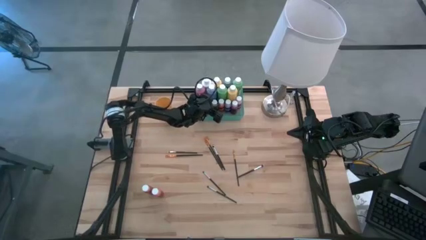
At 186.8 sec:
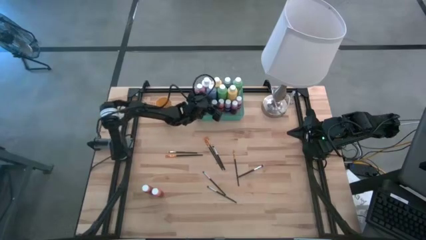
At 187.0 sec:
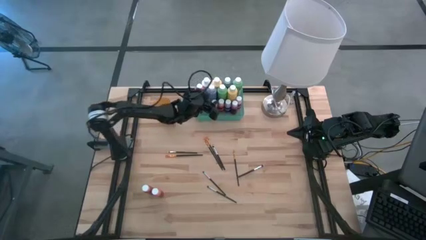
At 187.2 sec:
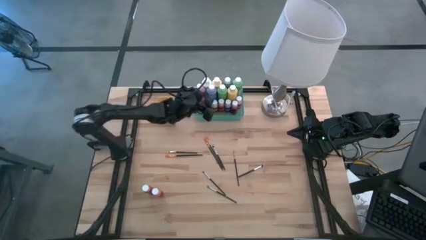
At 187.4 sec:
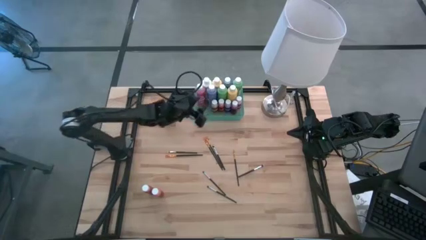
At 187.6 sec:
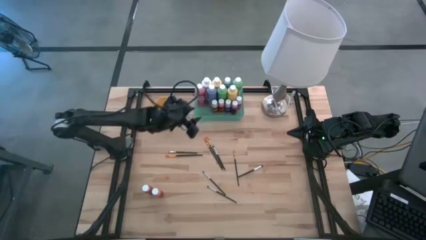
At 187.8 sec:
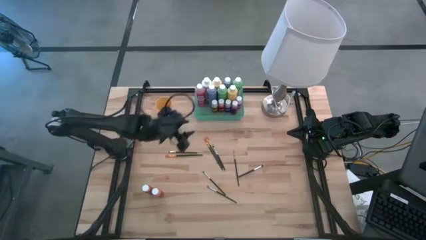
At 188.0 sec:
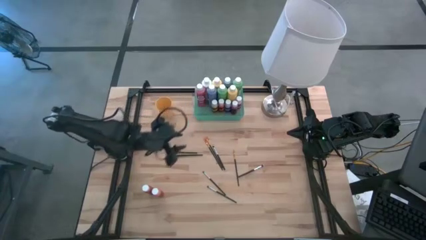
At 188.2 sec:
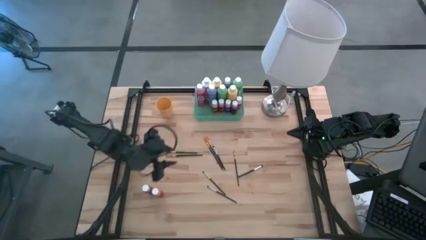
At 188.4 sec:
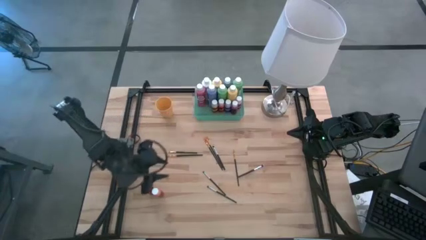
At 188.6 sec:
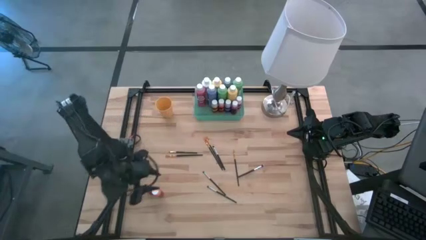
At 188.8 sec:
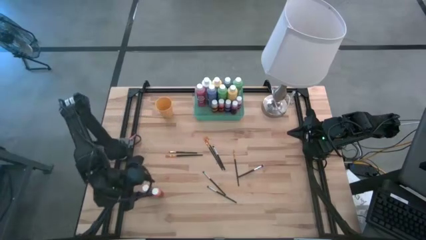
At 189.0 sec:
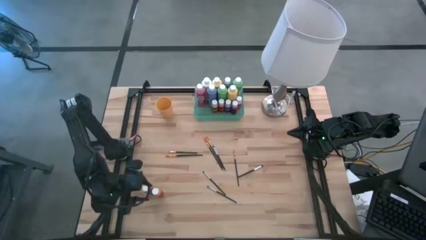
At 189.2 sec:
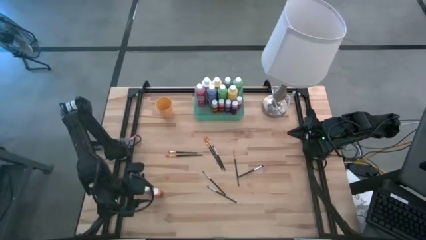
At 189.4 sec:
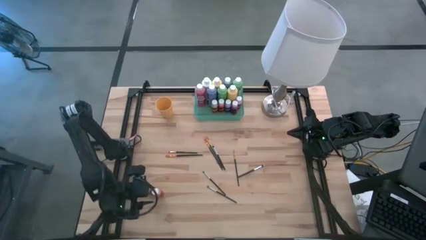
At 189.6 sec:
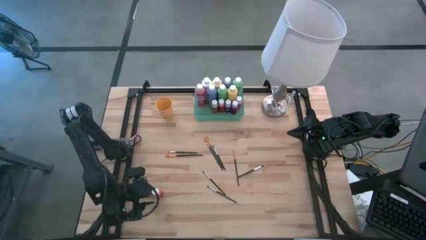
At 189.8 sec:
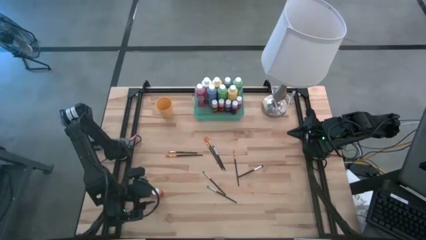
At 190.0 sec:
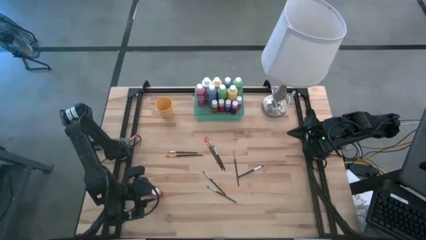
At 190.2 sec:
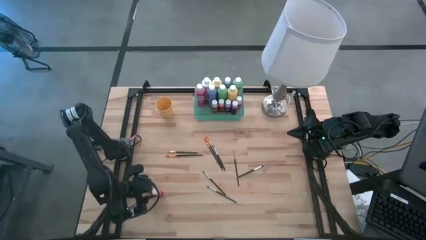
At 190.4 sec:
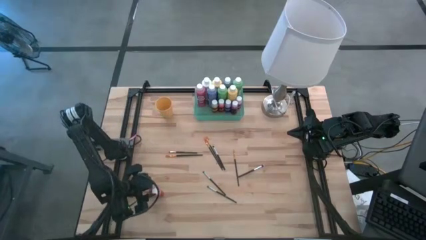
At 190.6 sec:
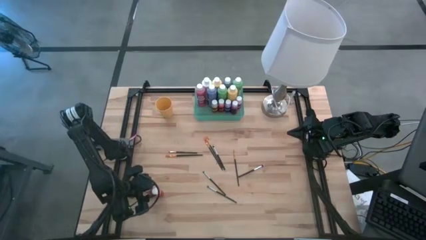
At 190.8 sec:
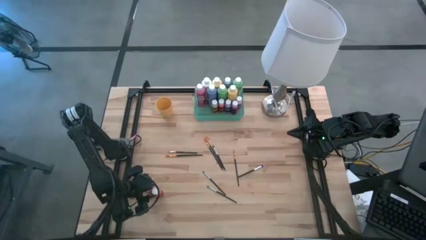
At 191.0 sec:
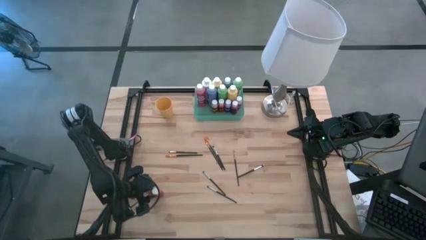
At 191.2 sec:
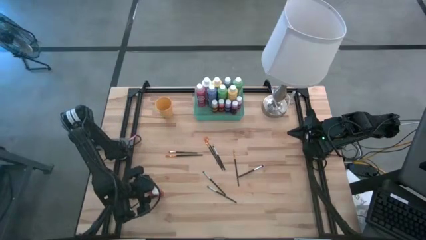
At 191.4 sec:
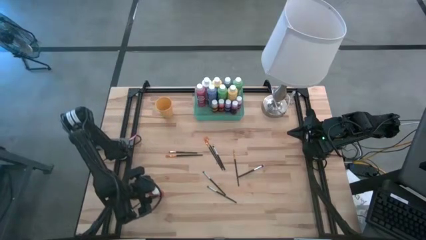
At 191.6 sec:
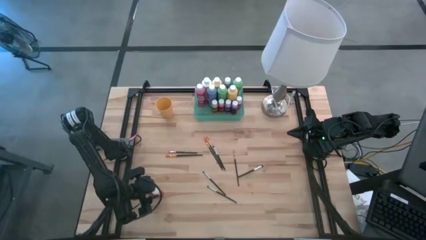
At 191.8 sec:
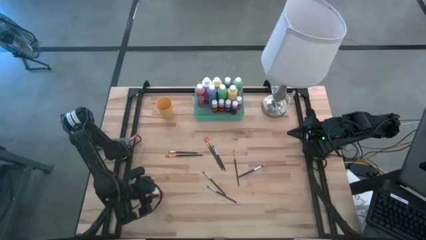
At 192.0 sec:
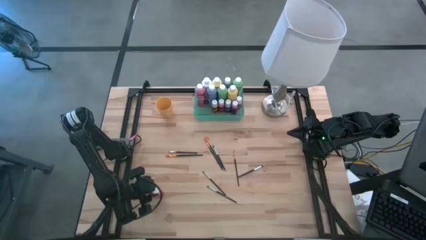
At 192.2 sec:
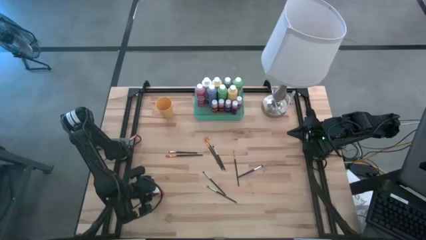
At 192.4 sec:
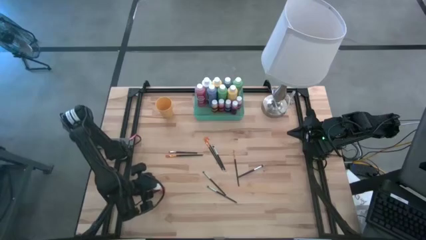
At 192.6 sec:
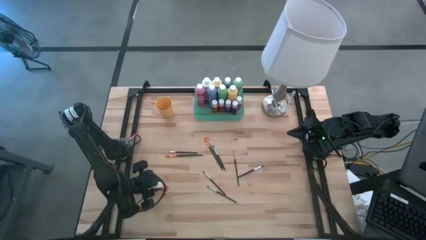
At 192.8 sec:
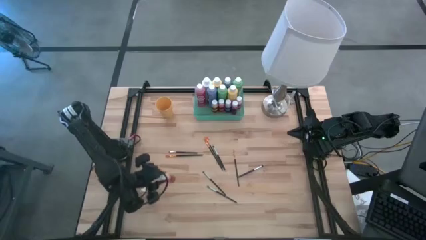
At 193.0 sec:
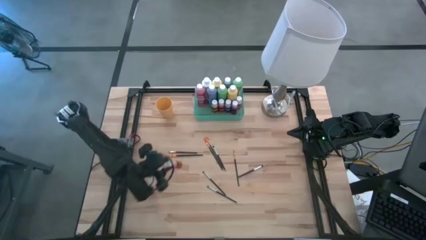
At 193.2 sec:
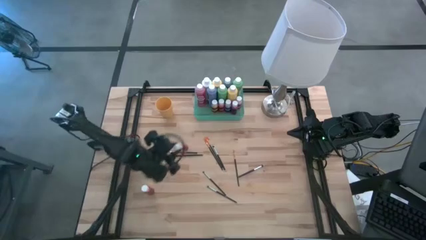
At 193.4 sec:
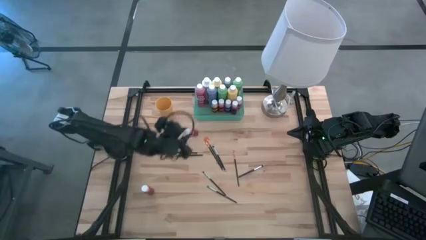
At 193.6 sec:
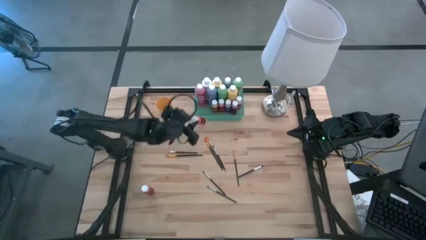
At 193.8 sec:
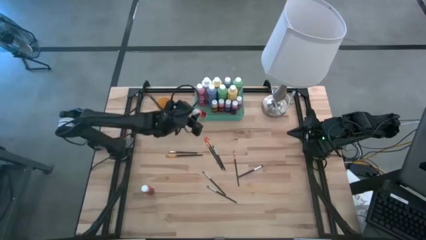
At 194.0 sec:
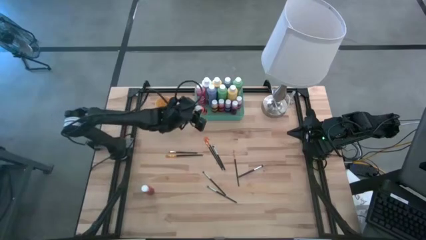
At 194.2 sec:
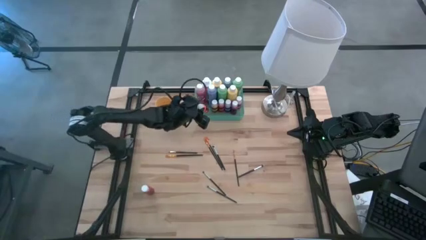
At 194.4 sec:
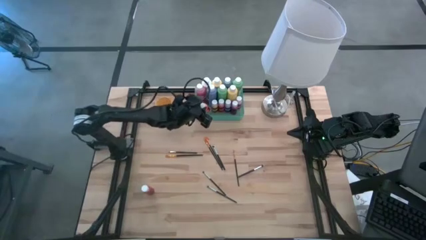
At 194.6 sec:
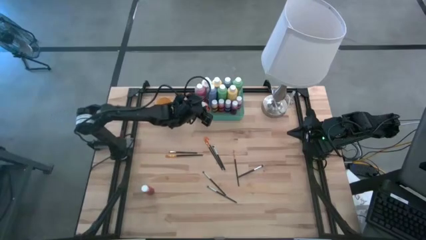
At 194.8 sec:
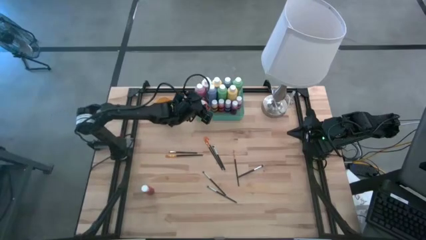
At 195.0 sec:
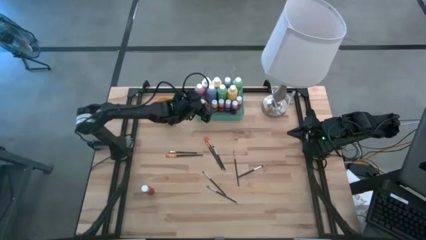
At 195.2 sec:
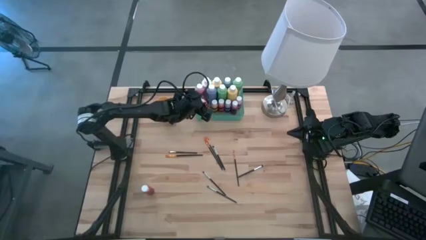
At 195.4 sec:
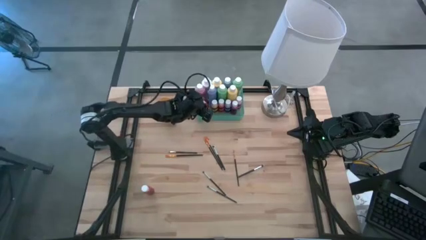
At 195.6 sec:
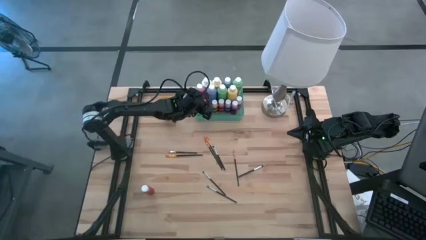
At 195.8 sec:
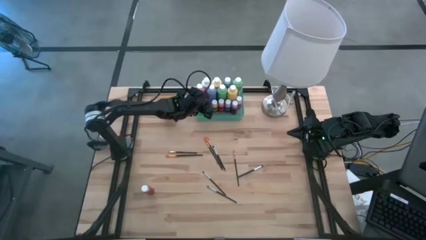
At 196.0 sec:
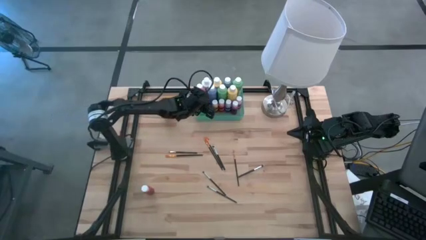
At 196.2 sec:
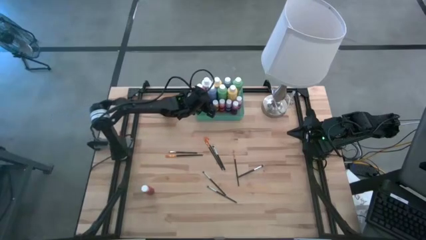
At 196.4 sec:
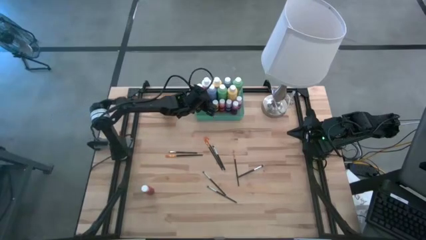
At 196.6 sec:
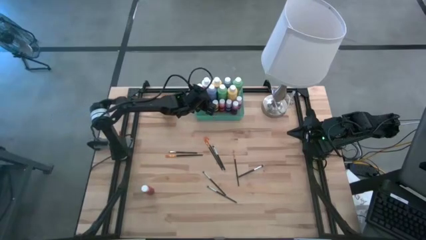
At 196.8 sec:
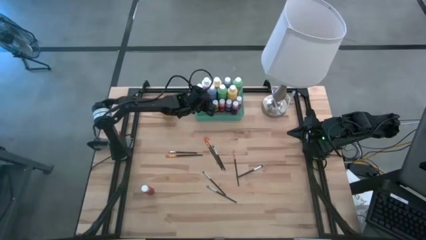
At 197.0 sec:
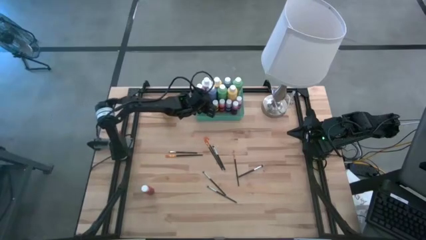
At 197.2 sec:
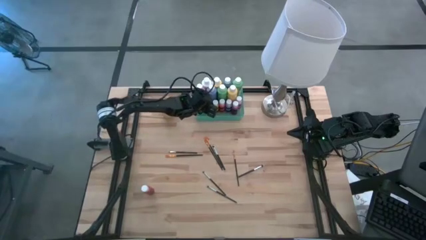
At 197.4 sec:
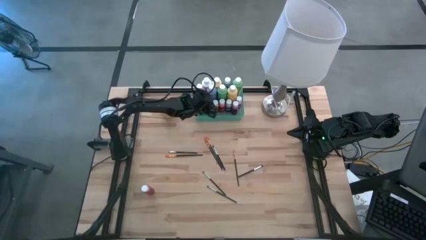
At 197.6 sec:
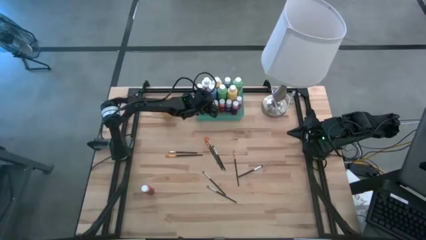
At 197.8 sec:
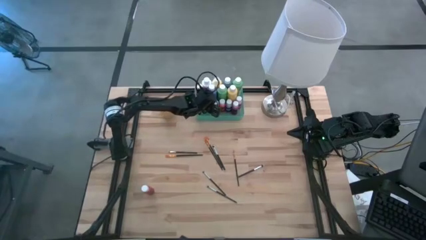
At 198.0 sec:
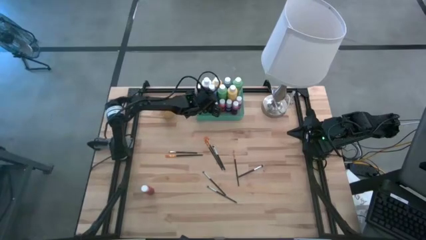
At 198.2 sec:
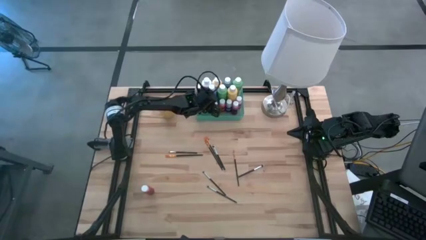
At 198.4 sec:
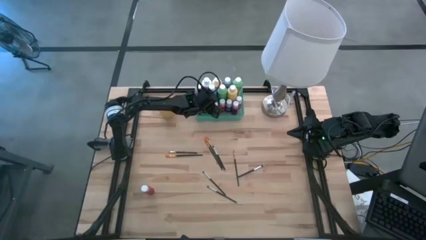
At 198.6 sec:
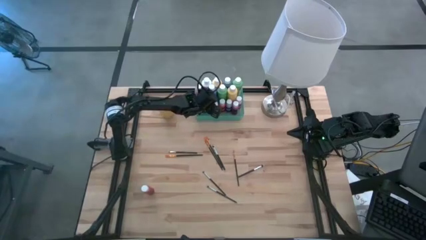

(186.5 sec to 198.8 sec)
Task: Pick & Place Paint Supplies
Put the small orange paint bottle into the green bin

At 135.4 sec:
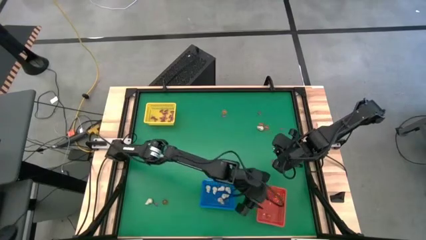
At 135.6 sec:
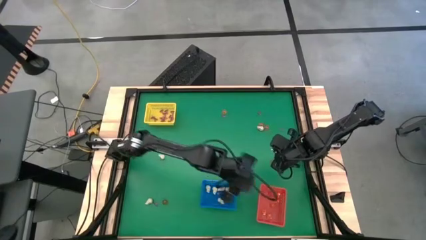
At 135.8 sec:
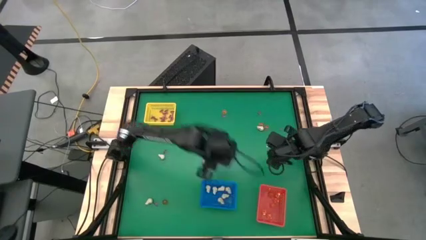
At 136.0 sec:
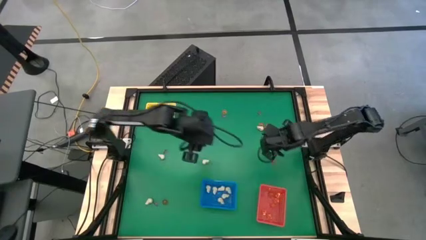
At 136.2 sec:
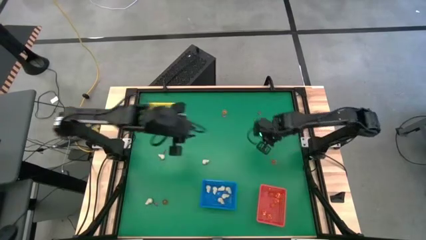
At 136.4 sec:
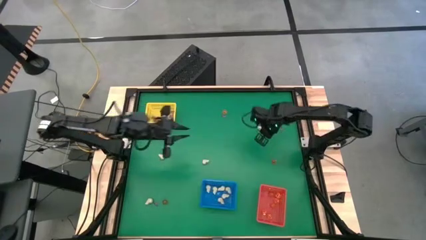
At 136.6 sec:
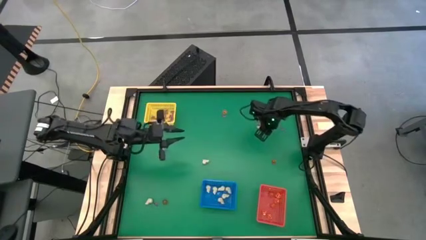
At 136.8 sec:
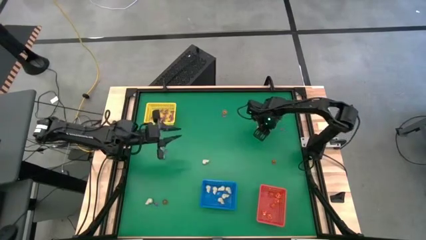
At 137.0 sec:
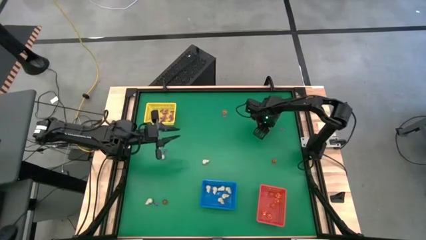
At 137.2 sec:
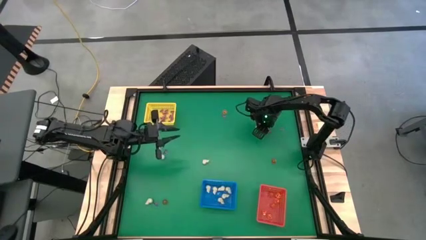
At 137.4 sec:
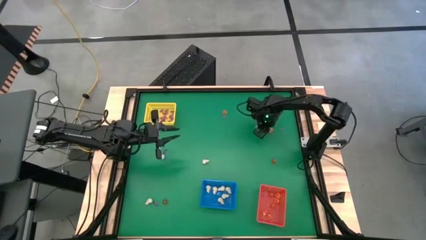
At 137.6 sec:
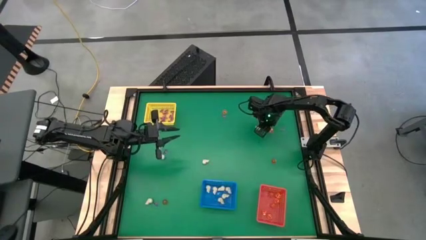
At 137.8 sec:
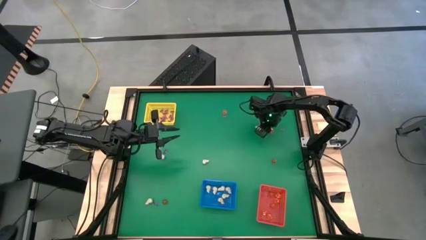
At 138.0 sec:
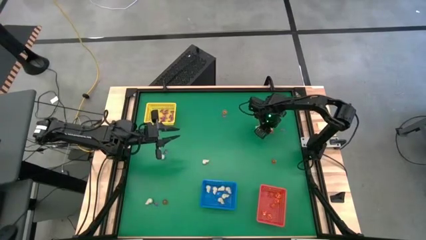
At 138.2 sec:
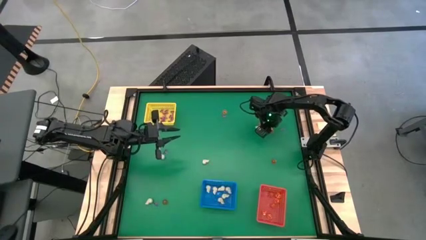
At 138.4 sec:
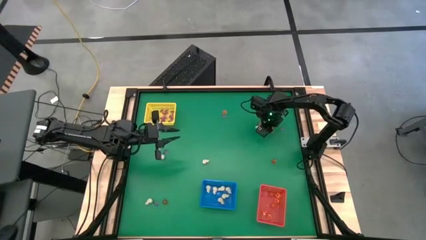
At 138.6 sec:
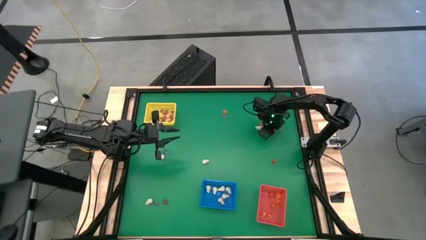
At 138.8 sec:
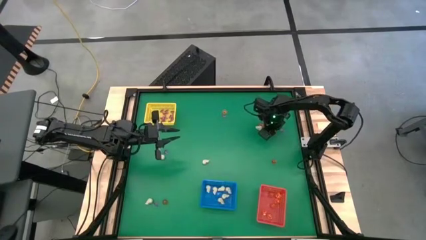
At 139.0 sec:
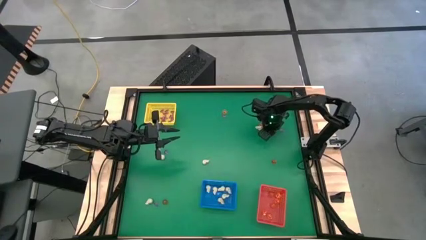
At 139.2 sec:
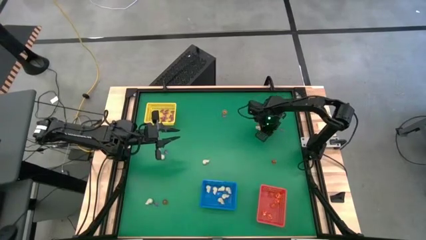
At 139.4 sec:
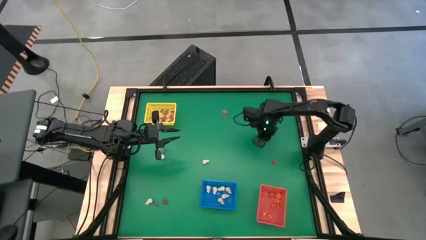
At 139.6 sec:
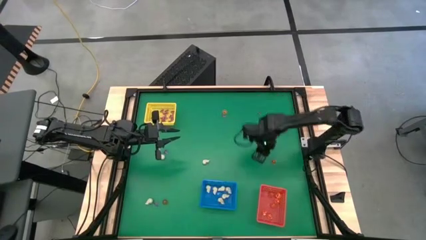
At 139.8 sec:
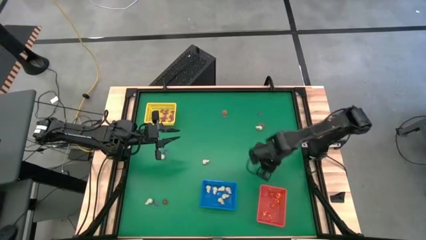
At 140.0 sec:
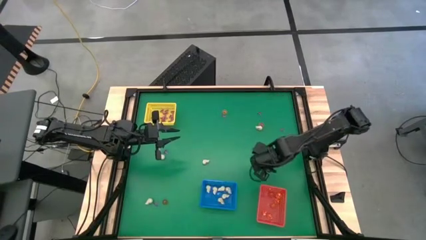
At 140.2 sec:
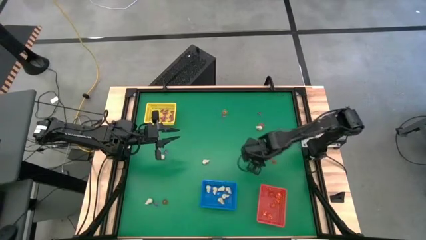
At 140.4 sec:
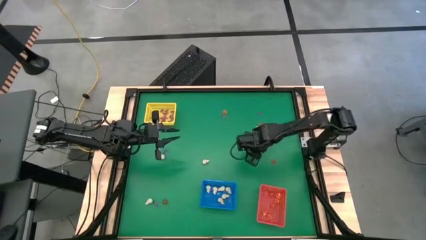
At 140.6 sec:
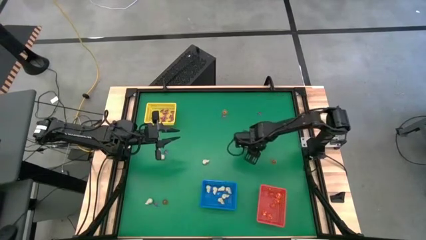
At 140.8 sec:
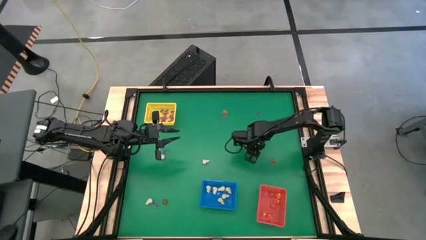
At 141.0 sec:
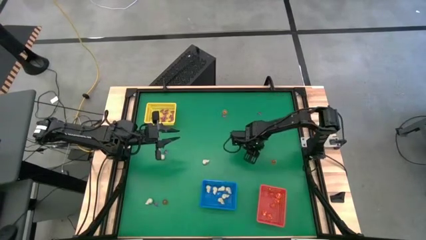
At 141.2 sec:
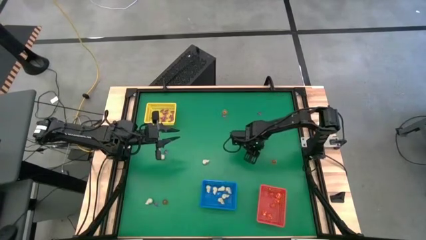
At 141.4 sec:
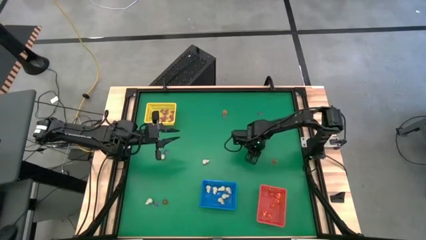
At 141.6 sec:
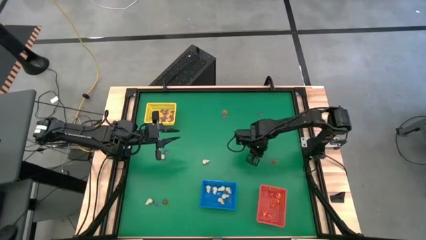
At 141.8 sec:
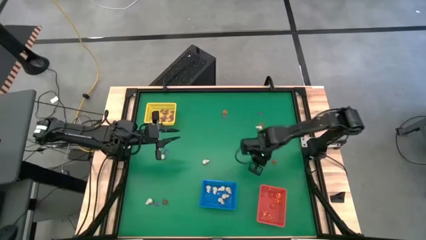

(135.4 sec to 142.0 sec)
Task: Sort Halloween decoration
Put the orange pumpkin toy into the orange basket
